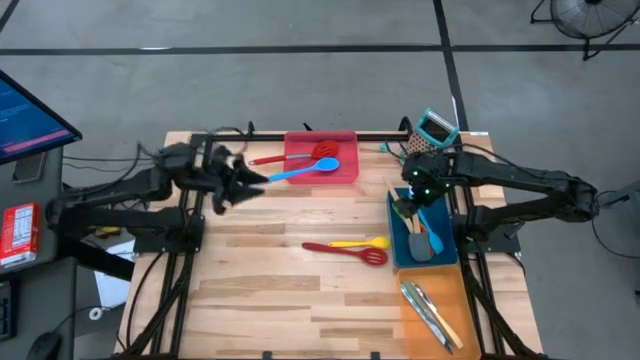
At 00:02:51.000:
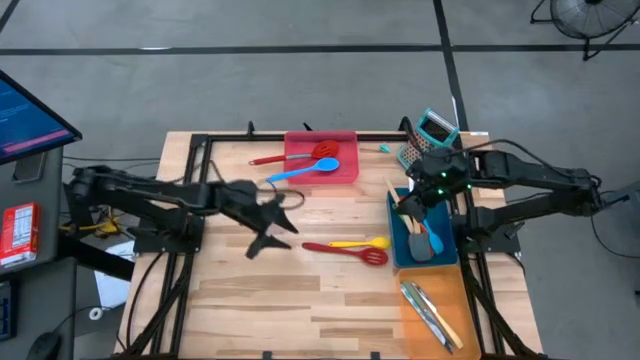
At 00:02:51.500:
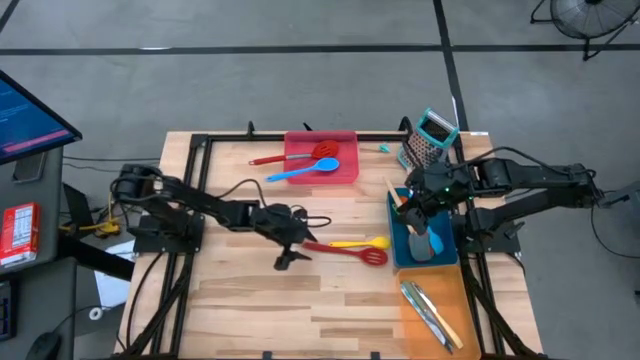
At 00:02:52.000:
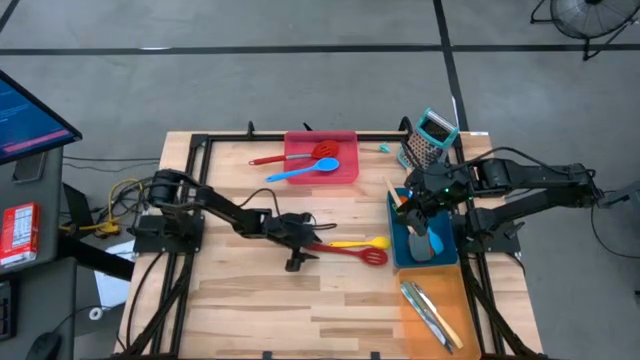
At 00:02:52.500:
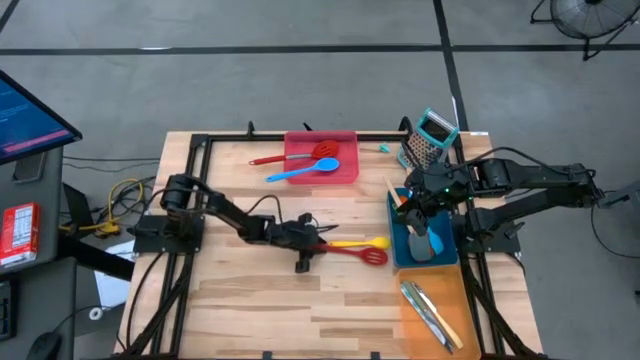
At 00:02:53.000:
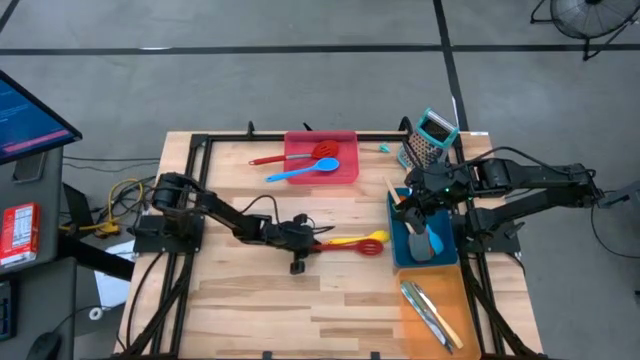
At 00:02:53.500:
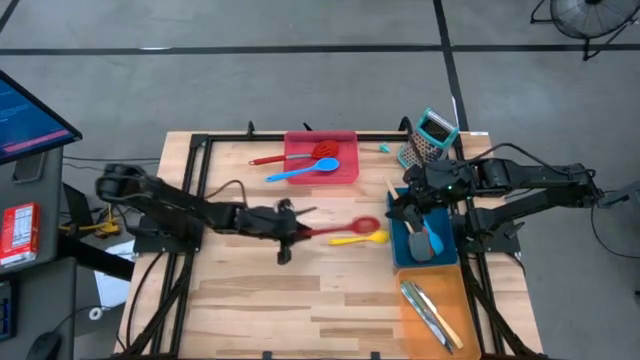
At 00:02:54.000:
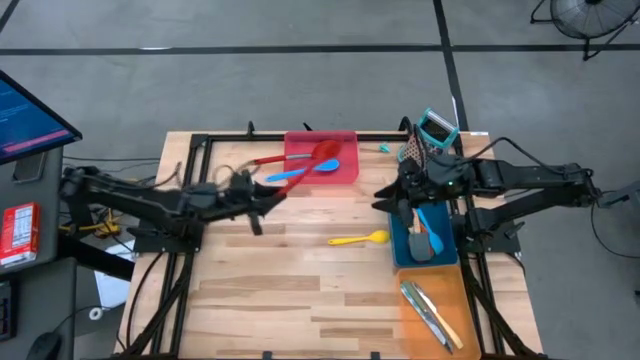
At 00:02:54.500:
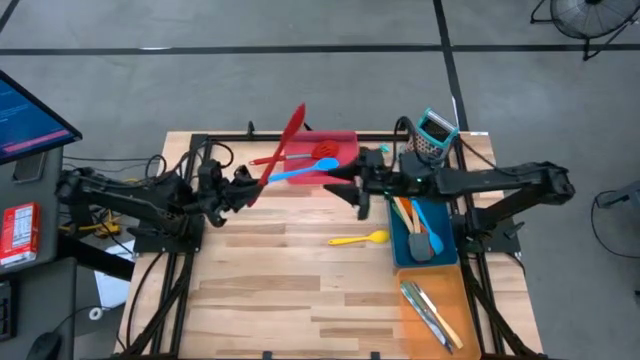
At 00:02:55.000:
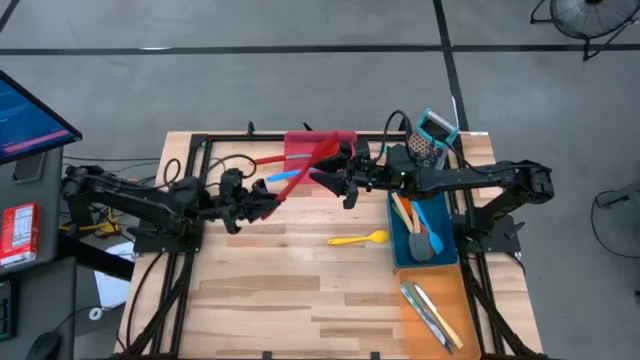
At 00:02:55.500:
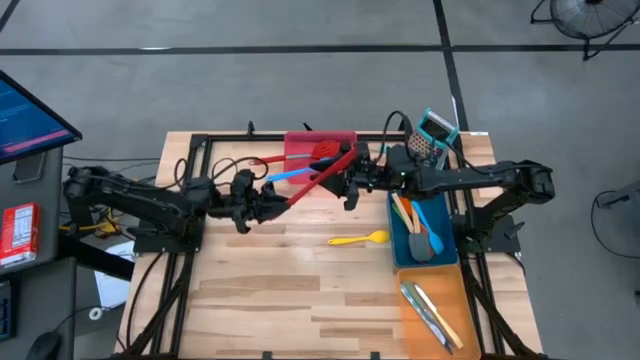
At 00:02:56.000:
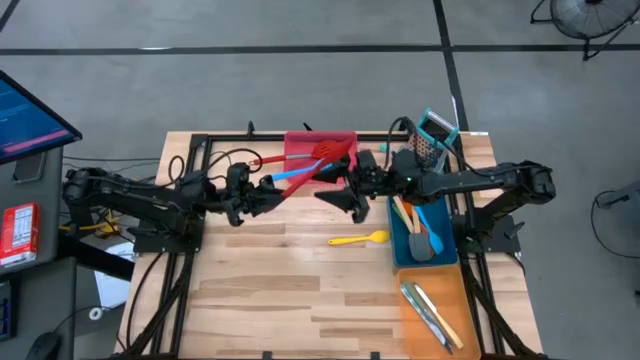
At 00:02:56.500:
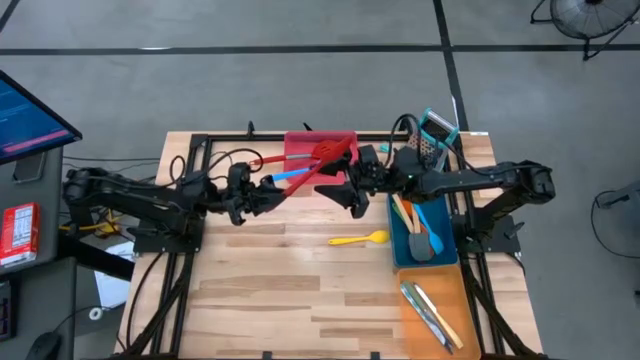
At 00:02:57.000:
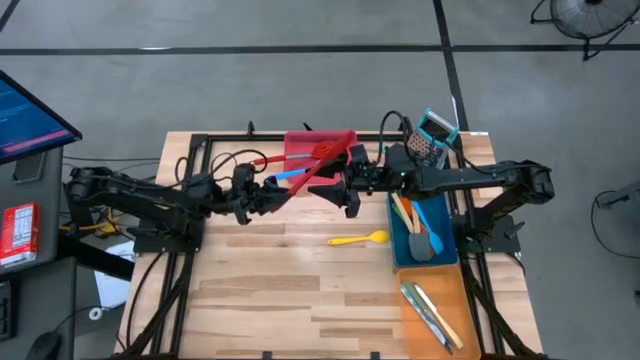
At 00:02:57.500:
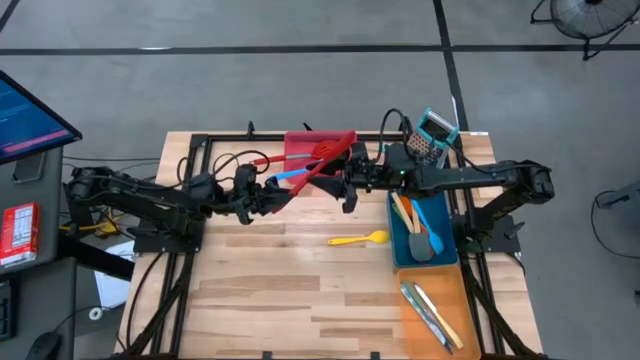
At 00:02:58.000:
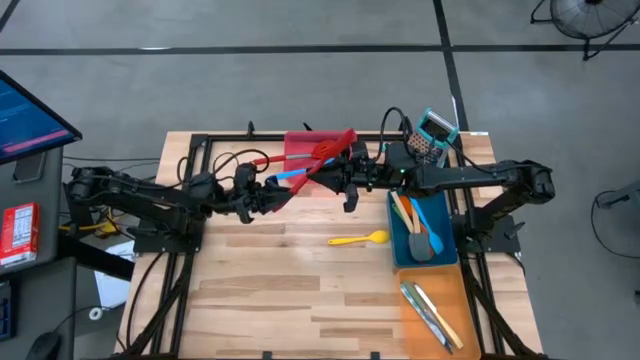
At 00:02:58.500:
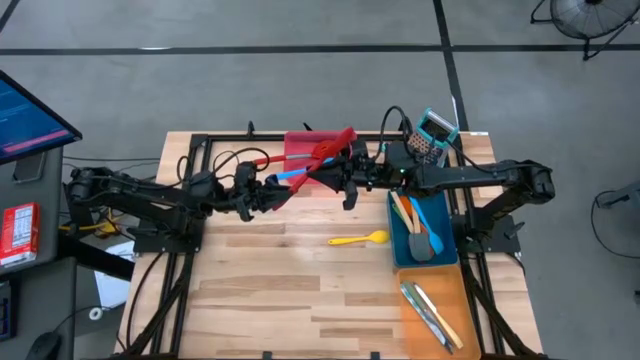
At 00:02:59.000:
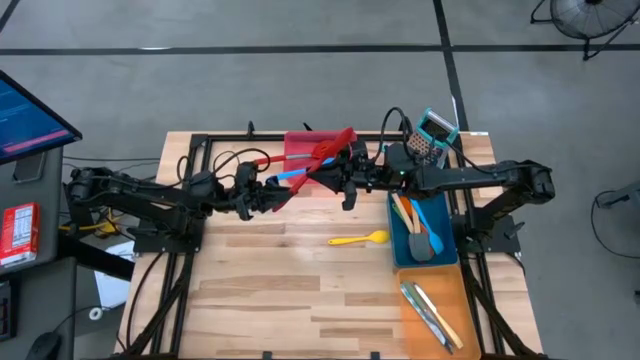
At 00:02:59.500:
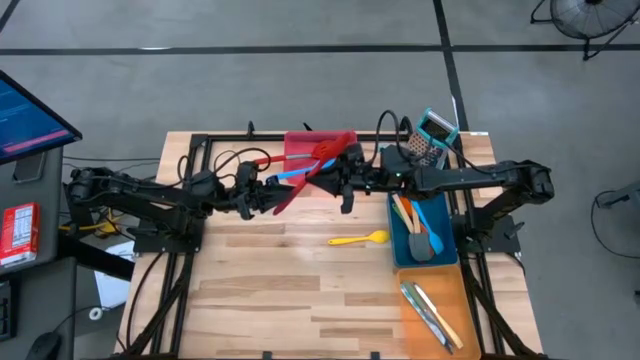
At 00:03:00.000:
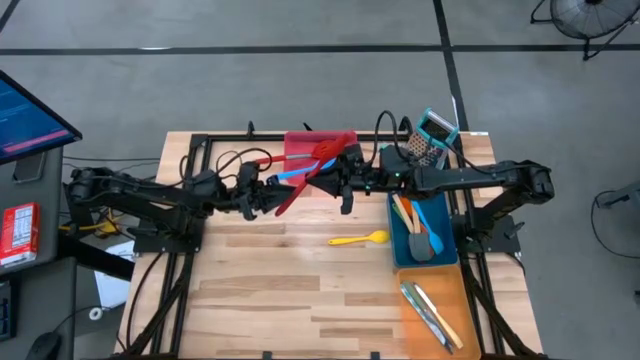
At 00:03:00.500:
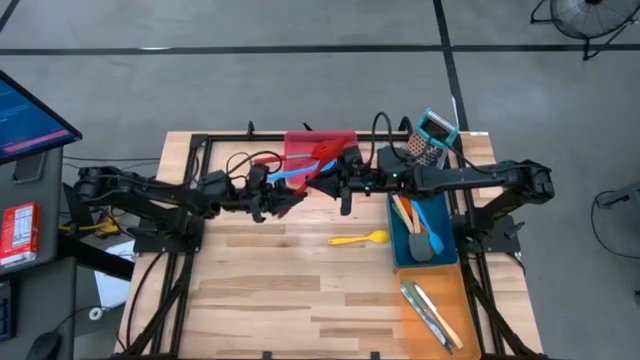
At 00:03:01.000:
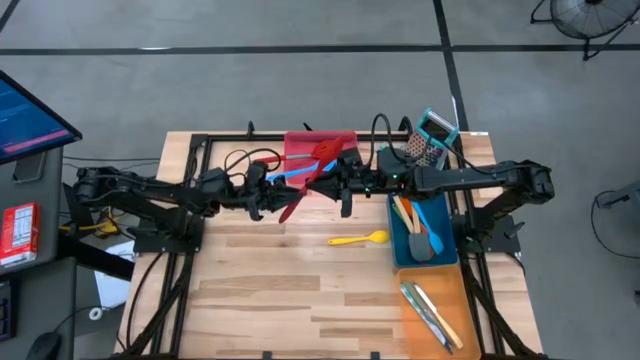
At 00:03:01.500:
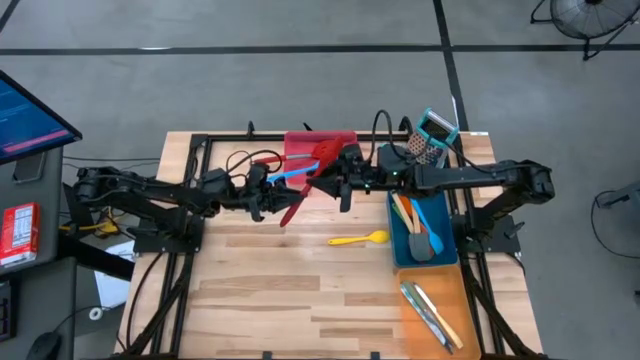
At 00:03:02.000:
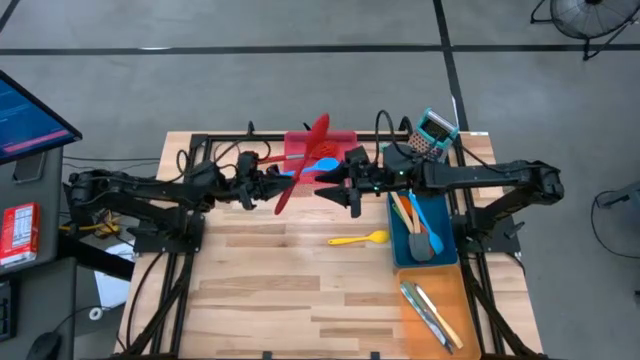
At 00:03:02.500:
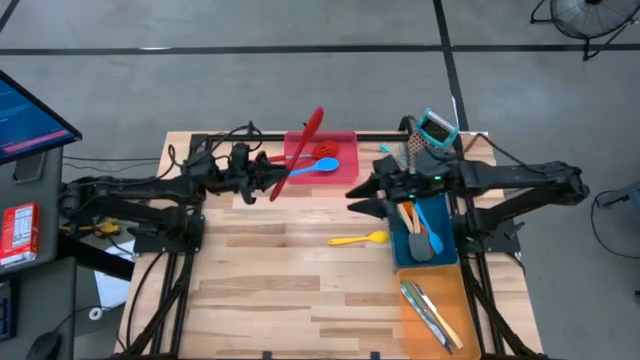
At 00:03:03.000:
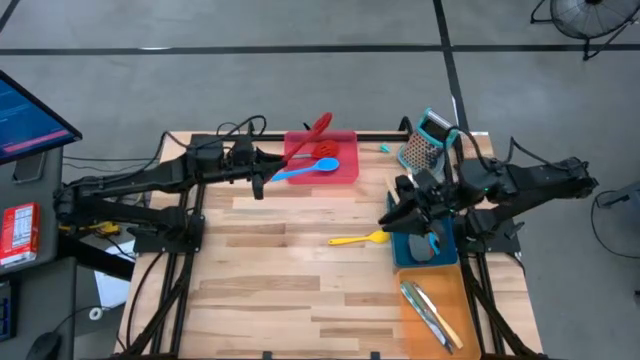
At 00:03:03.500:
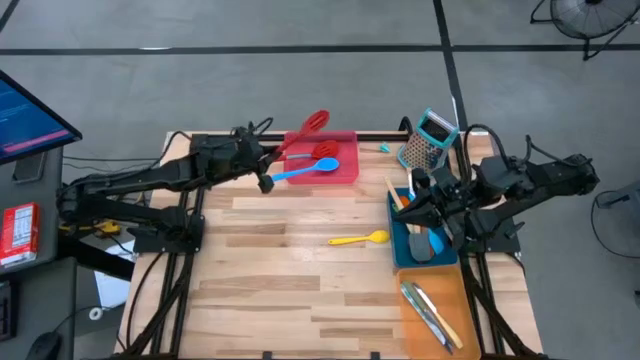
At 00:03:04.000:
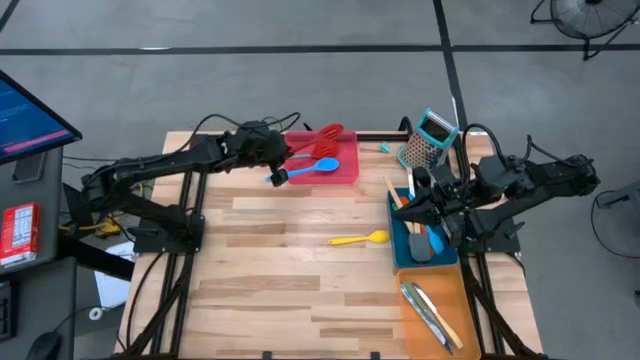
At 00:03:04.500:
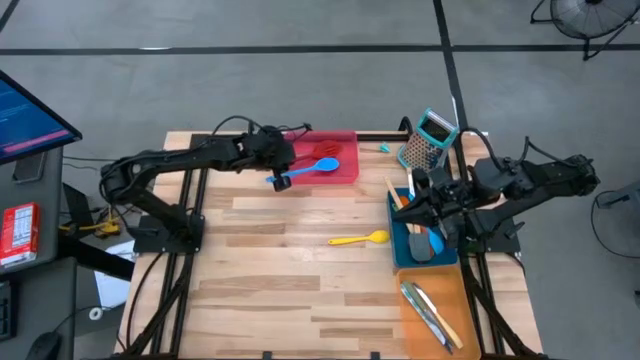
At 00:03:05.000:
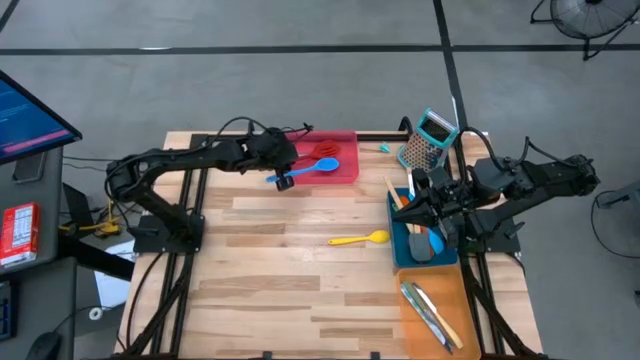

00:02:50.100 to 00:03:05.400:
Task: Pick & Place Kitchen Items
Put the red serving spoon into the red bin

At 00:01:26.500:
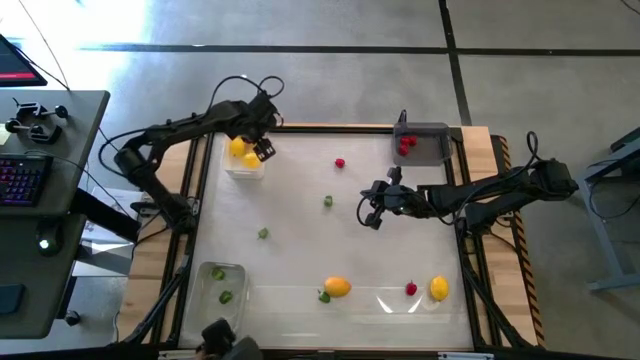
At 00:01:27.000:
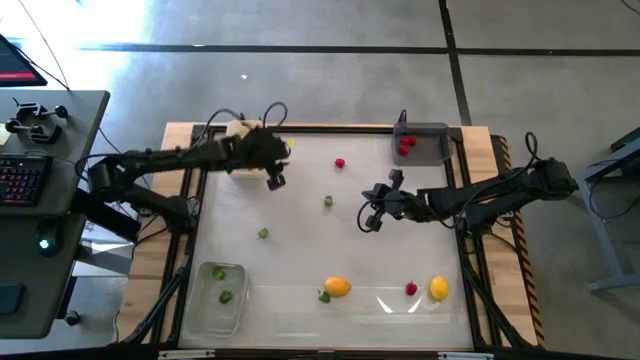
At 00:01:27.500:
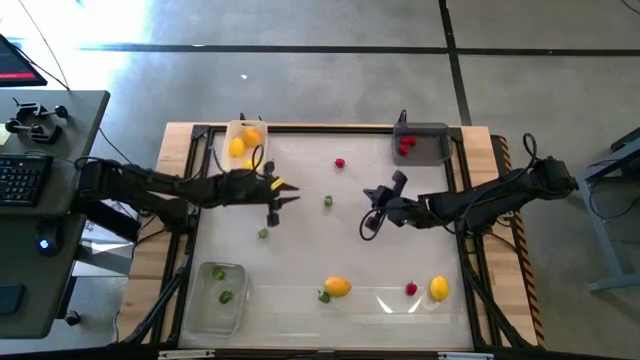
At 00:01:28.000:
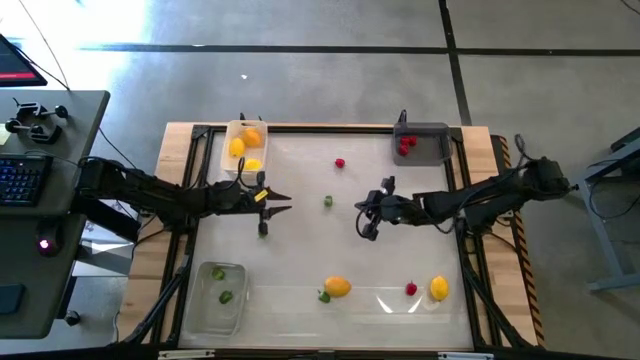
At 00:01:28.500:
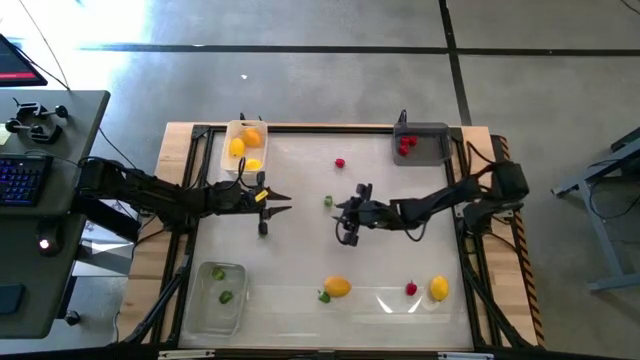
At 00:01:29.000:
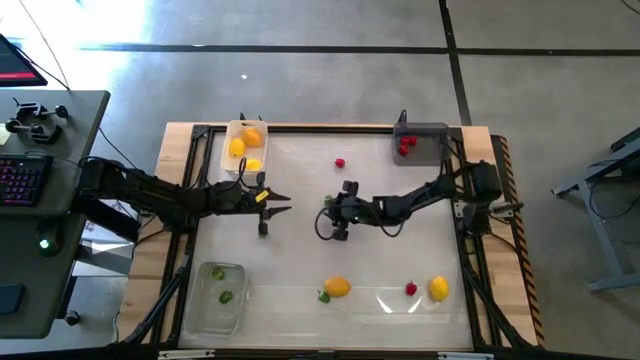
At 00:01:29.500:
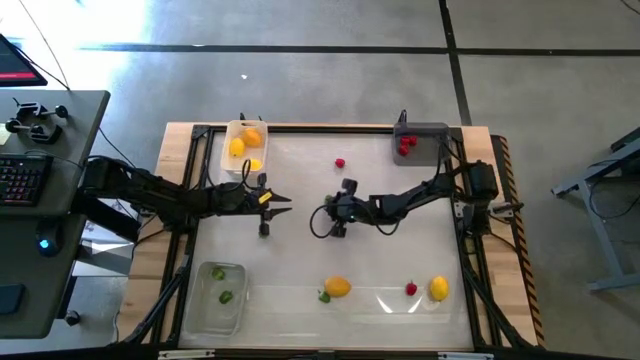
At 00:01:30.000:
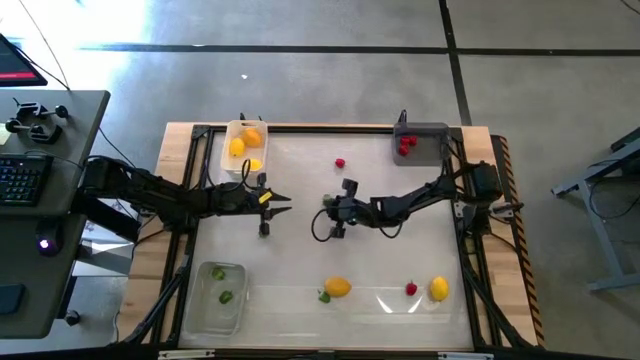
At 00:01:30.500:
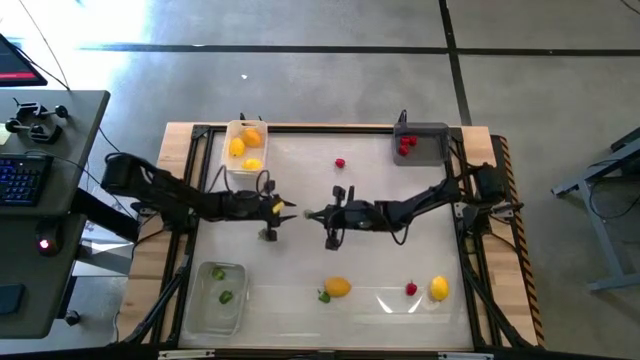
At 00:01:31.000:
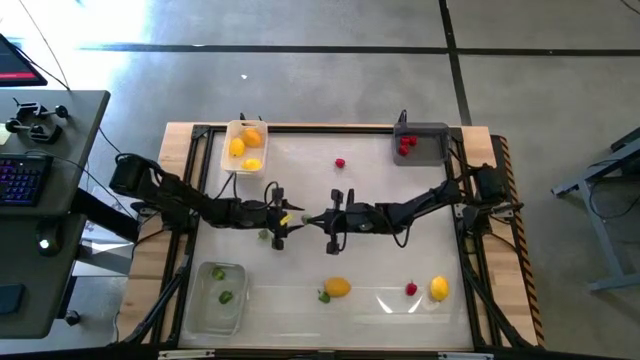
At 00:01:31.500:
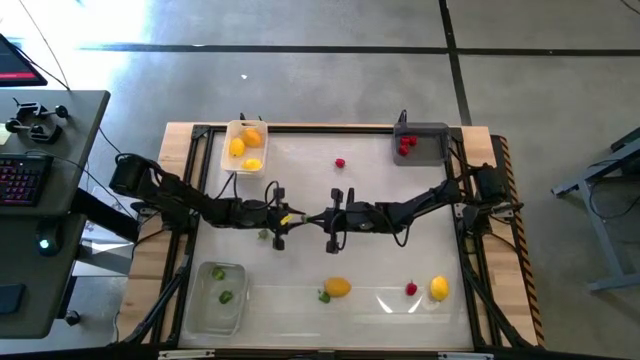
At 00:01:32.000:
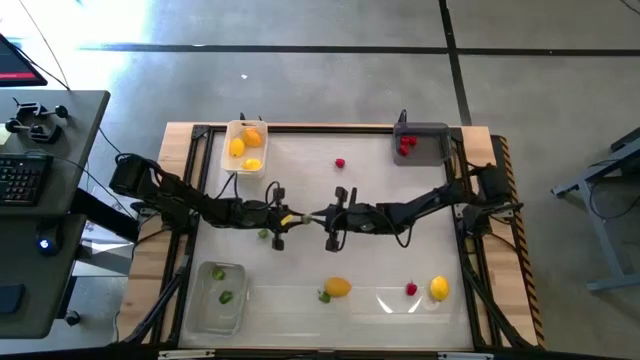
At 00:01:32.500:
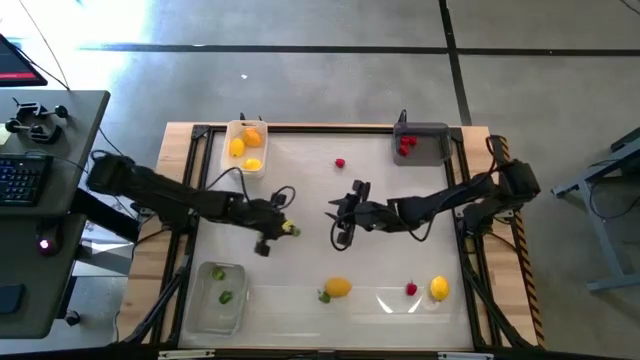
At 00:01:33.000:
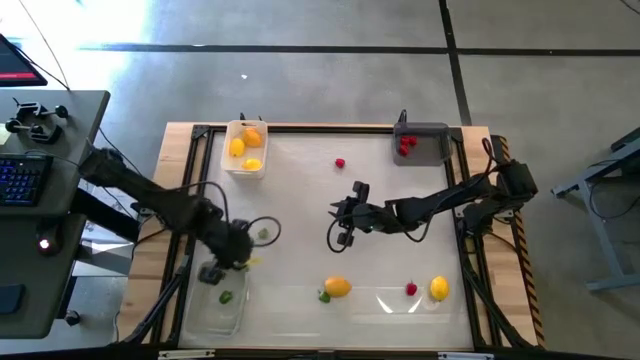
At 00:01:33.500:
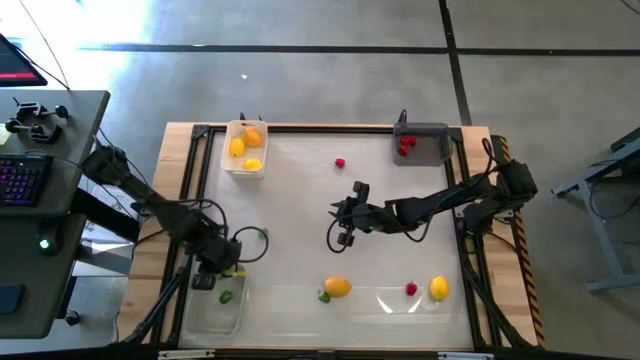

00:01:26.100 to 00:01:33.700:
Task: Sort produce into baskets
Put the green bell pepper into the gray bin
